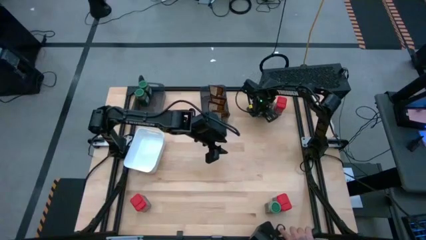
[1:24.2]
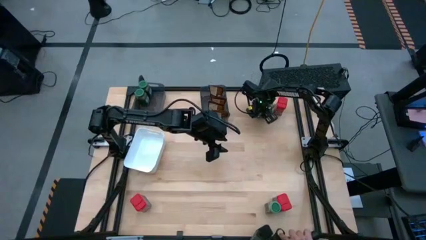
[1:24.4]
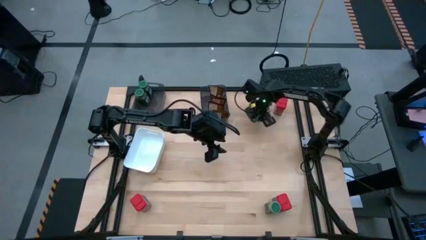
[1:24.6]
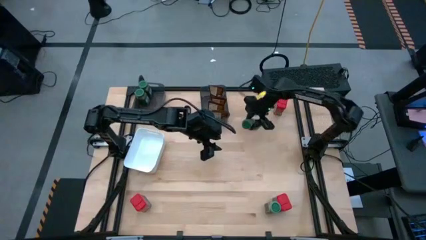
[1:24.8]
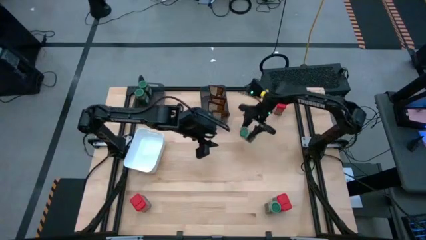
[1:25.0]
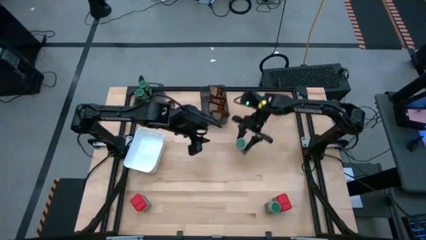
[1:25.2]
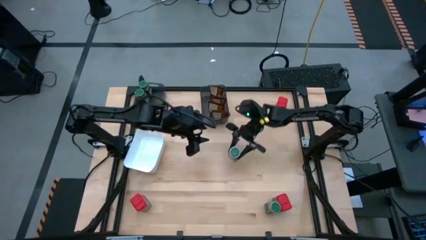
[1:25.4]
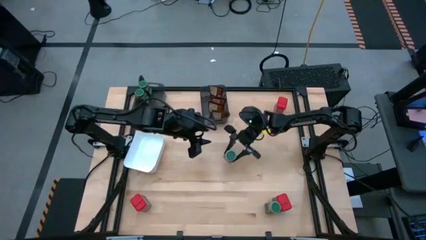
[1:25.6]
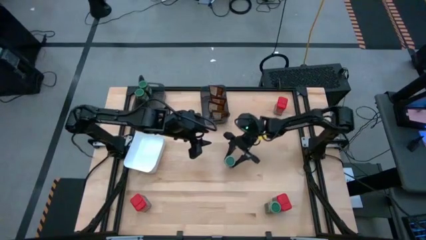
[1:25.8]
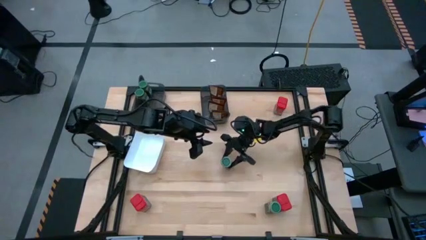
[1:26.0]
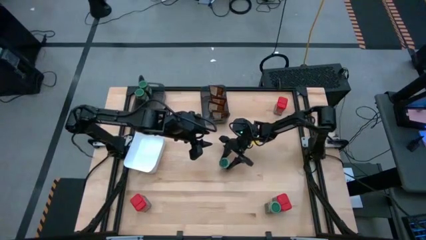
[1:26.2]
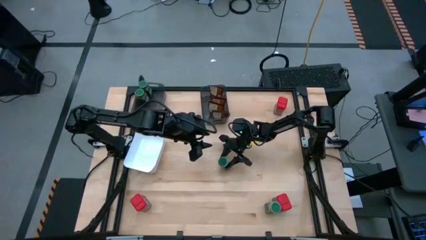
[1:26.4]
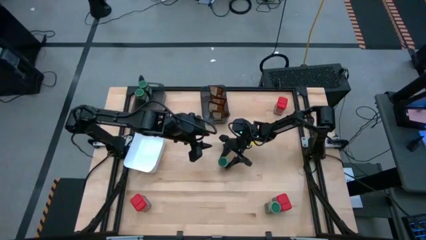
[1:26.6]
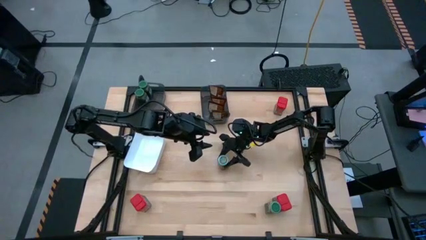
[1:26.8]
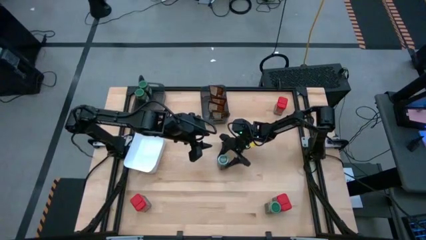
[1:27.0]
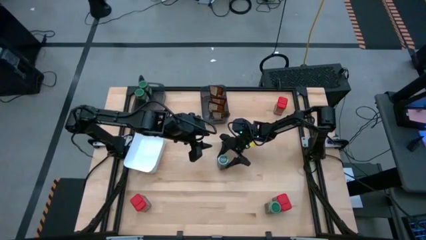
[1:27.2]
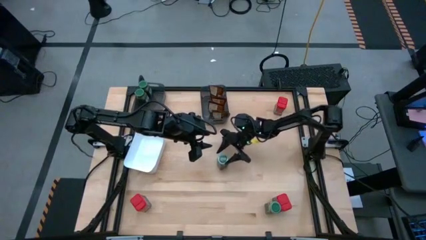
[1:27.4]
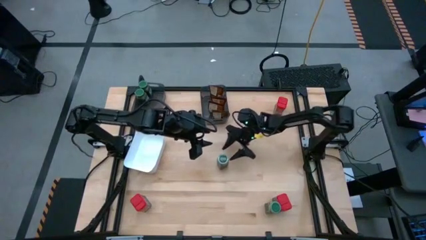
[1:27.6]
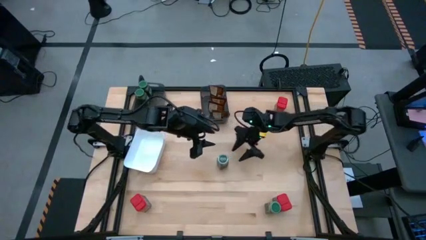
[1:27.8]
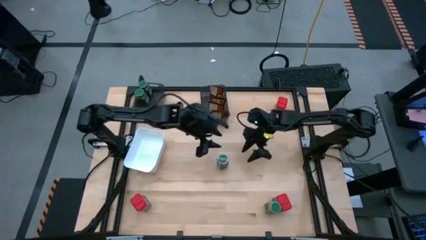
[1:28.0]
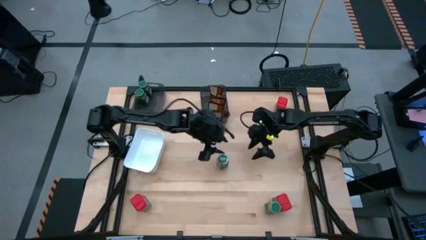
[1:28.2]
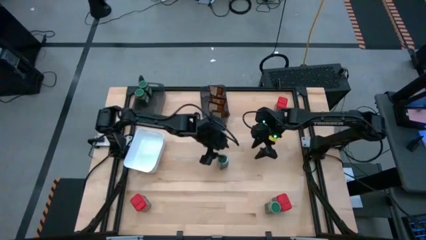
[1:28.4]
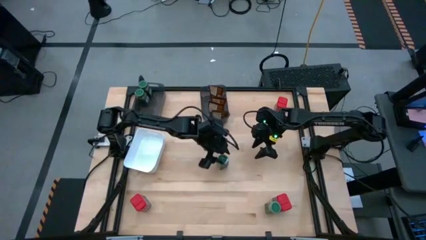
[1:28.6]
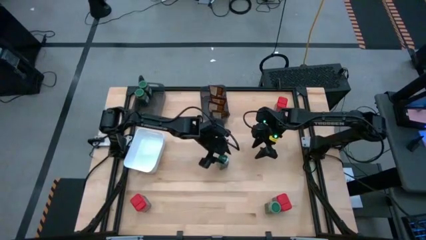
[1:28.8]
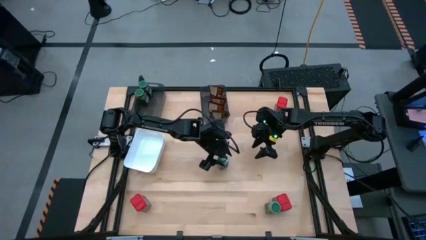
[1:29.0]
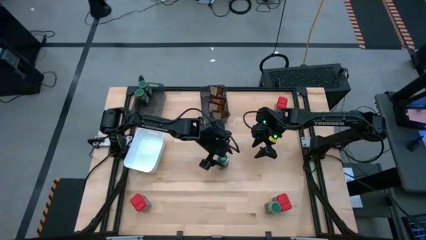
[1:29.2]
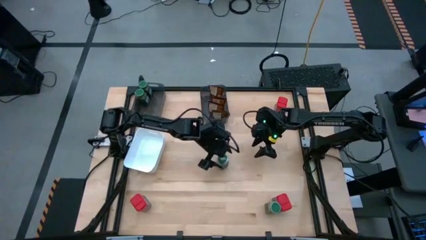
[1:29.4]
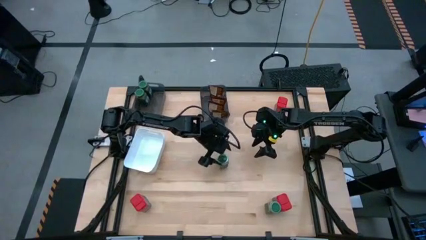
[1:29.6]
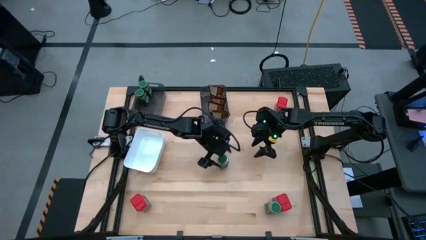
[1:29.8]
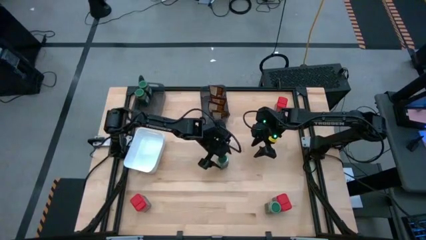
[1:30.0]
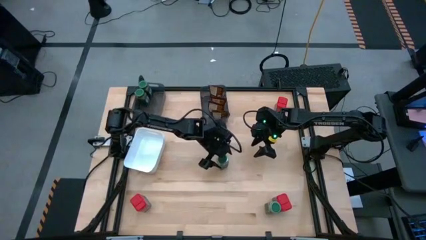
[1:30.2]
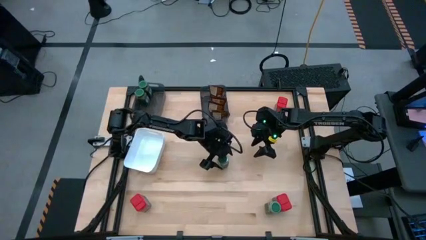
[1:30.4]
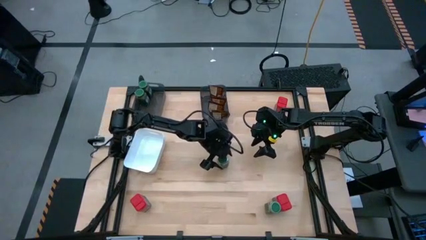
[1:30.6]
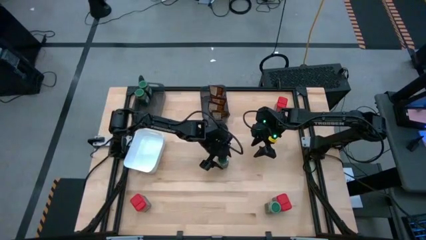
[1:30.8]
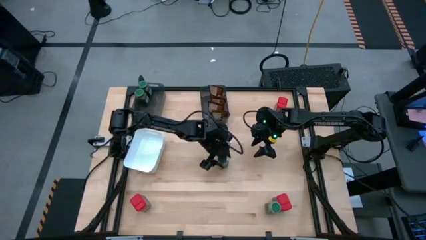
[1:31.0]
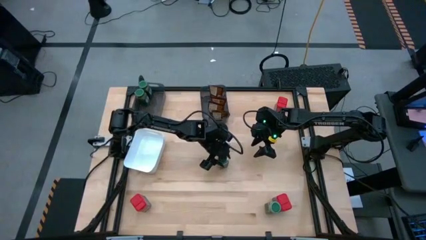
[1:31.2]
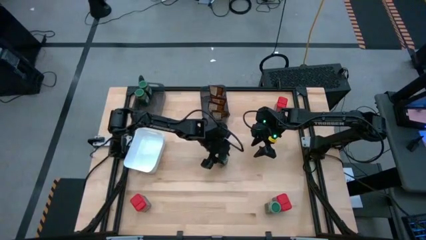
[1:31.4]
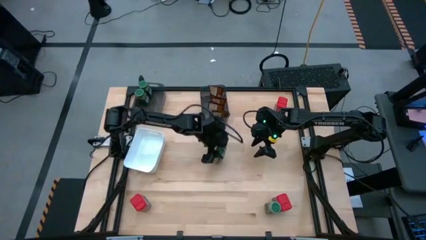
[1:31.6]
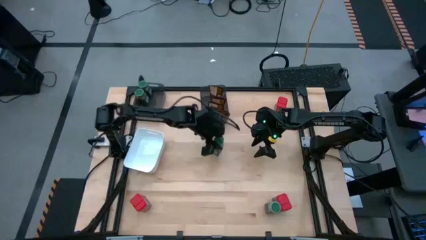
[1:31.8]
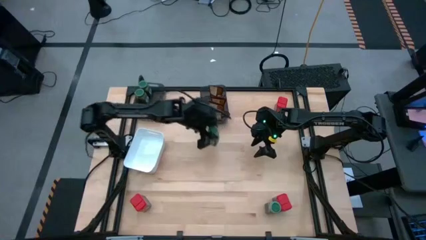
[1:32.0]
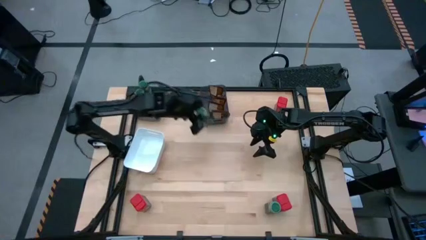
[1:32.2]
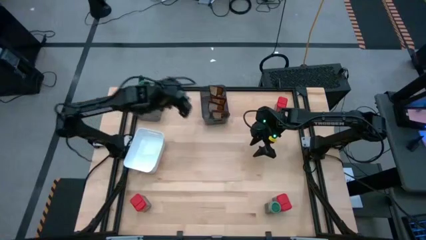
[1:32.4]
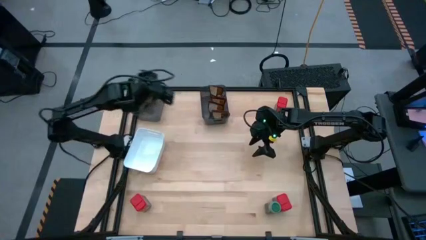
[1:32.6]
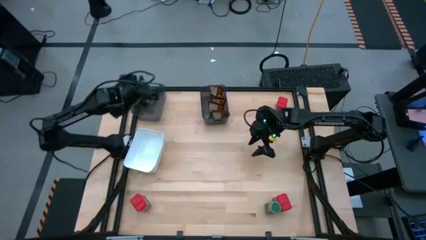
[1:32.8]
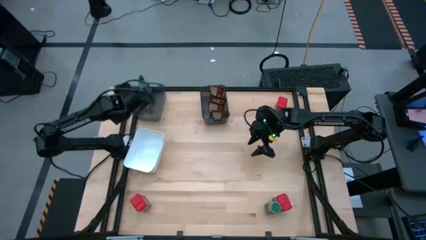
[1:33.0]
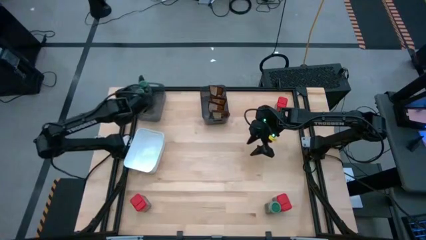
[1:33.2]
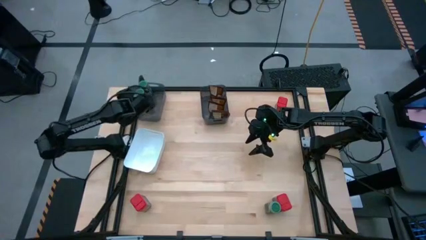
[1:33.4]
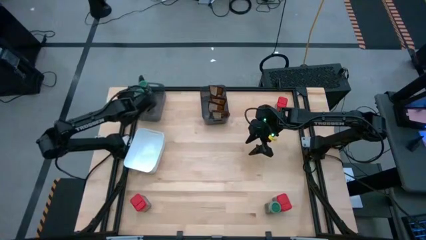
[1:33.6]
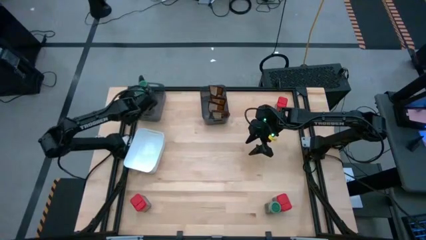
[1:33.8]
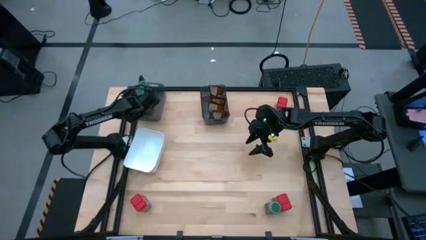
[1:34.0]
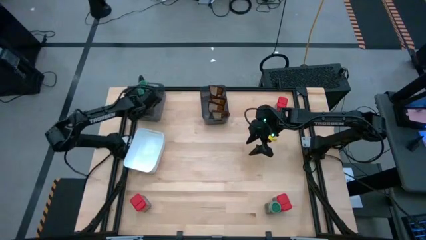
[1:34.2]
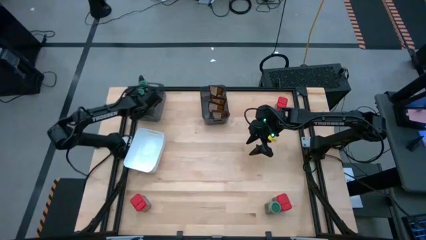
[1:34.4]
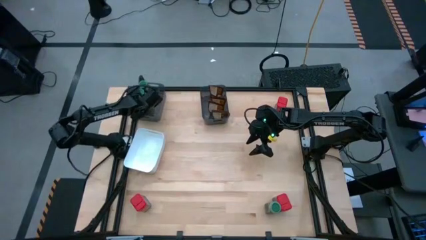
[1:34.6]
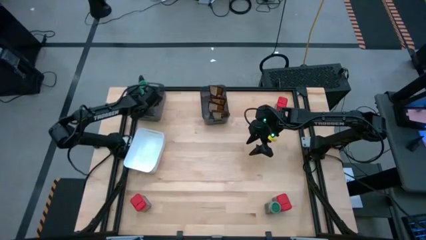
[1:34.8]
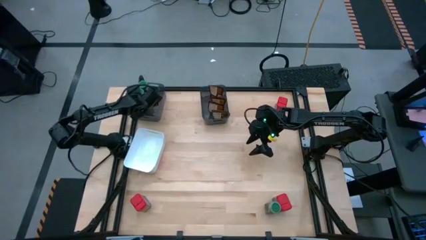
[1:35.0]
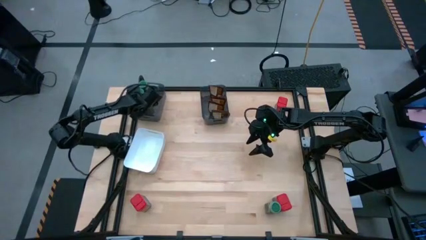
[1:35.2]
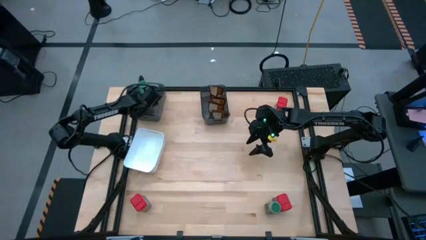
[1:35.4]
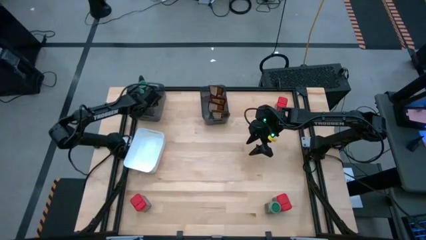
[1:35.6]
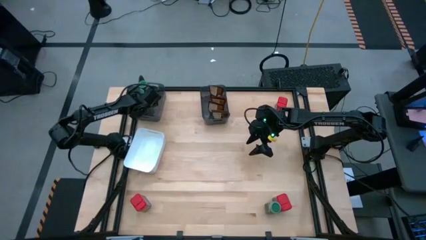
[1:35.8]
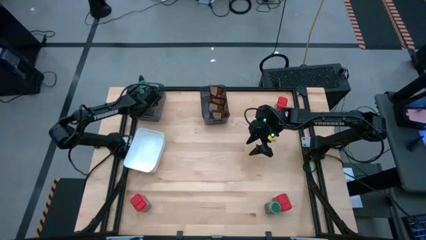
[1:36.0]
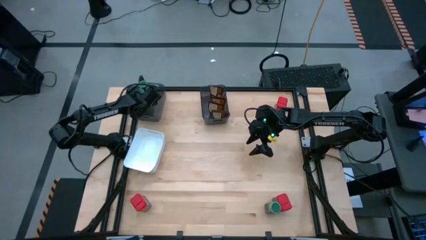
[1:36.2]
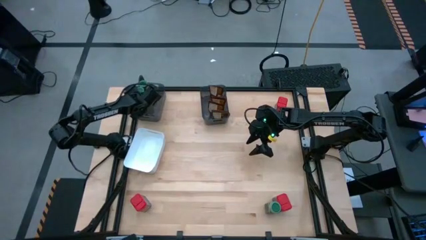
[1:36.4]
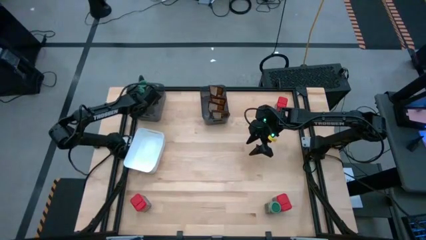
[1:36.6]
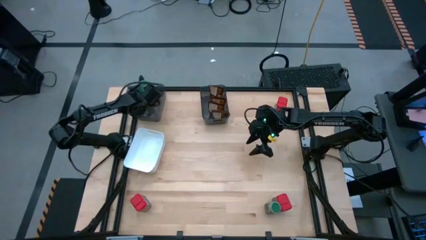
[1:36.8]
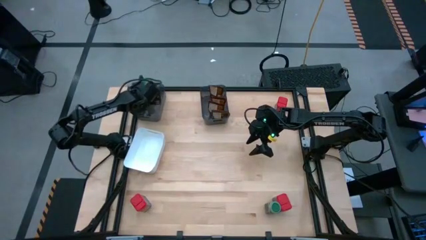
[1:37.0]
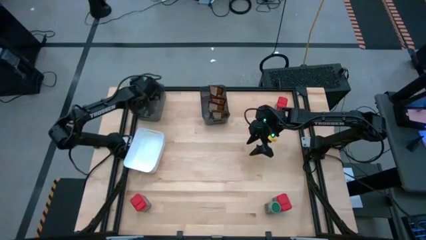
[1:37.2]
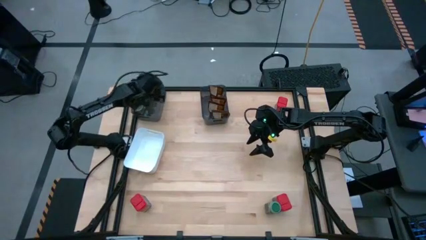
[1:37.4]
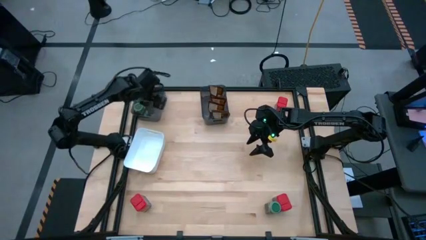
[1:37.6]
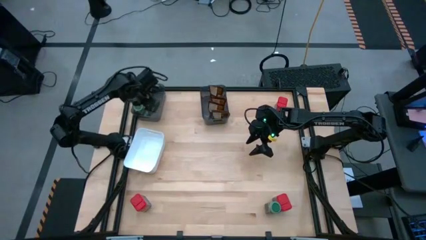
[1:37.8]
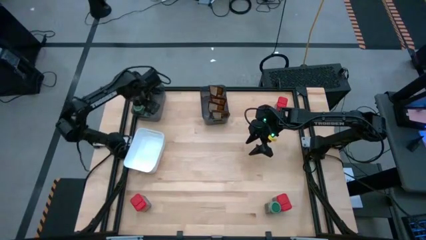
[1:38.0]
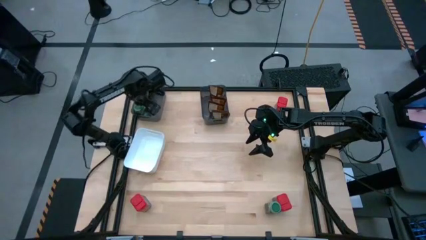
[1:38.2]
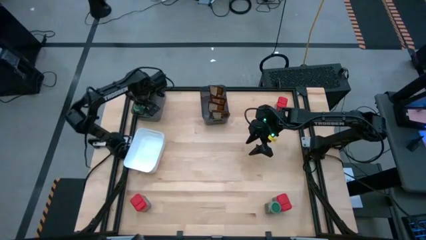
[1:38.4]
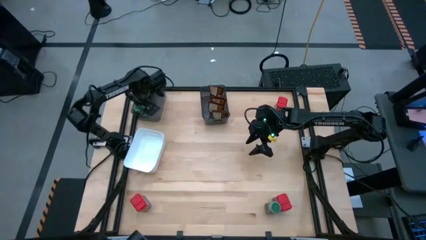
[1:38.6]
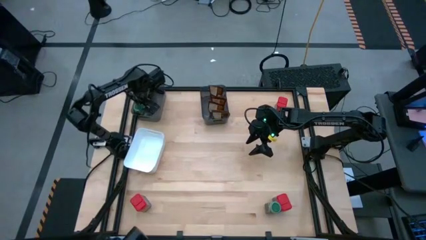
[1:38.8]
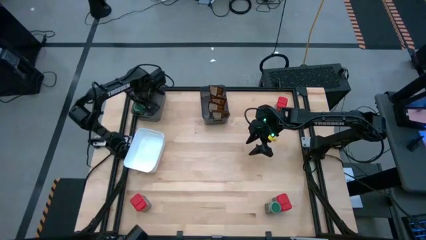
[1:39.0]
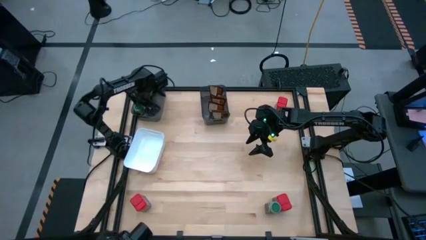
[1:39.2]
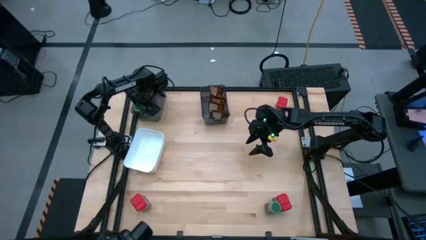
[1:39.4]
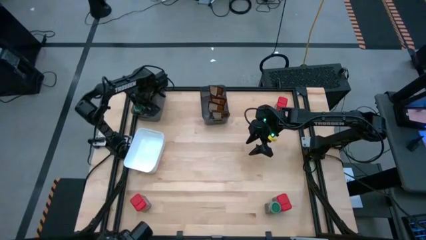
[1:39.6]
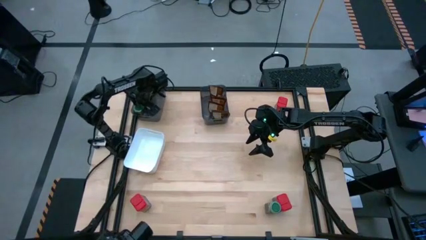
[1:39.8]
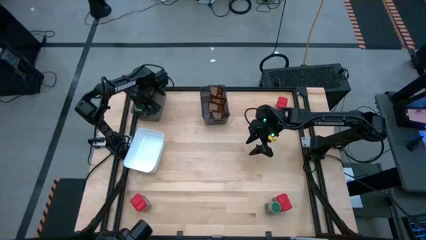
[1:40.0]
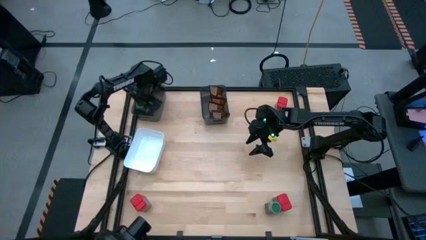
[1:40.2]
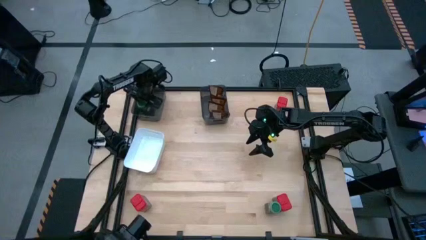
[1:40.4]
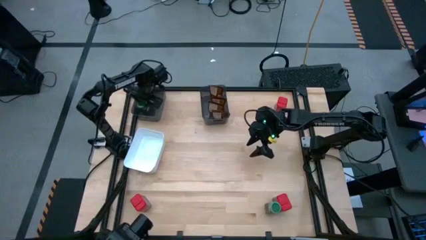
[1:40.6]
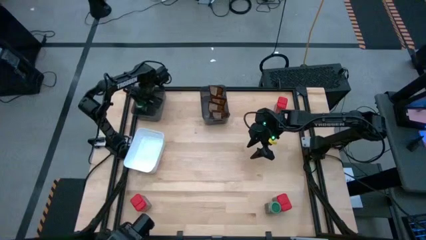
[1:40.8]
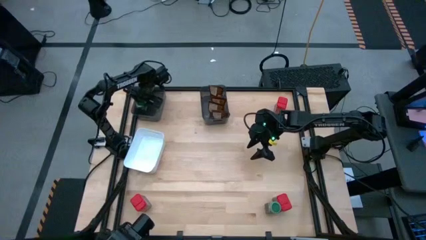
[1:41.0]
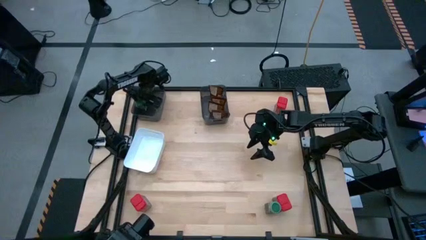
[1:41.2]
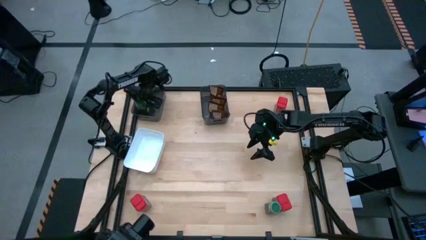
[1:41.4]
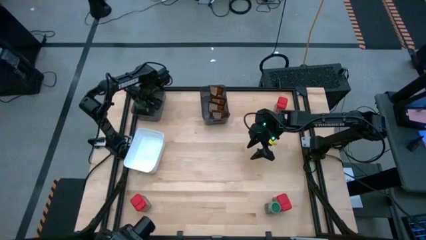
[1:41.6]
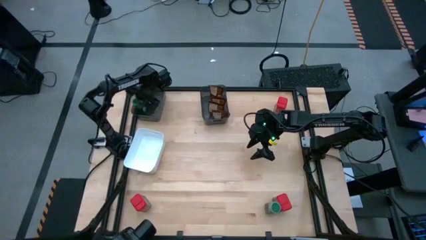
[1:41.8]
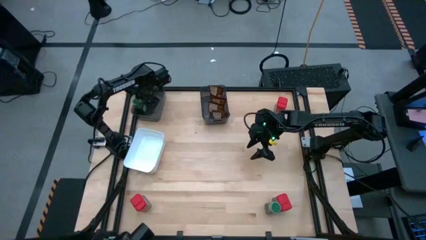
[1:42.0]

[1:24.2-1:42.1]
Task: Sort spices by type
Put the top green seasoning bottle into the left black bin
